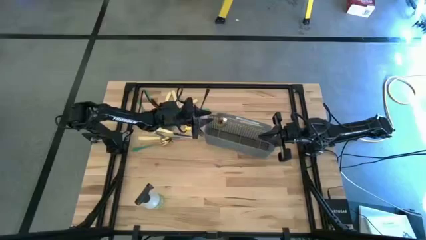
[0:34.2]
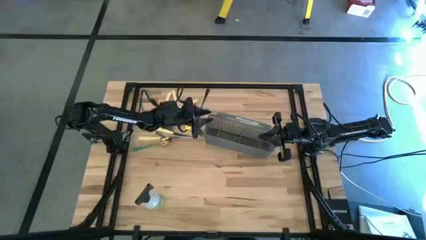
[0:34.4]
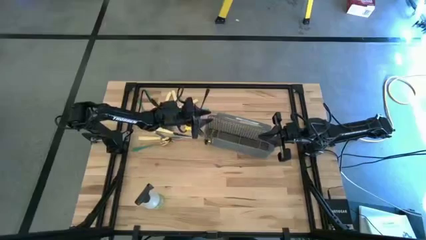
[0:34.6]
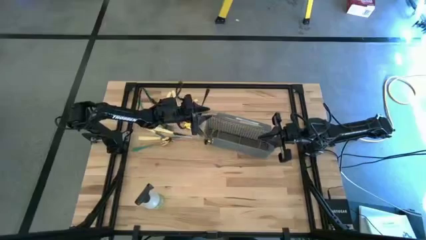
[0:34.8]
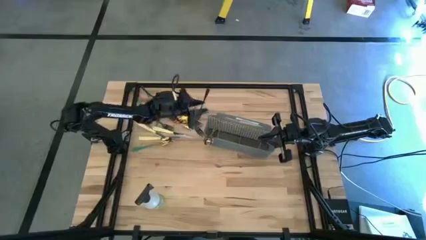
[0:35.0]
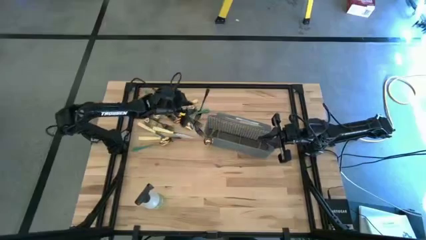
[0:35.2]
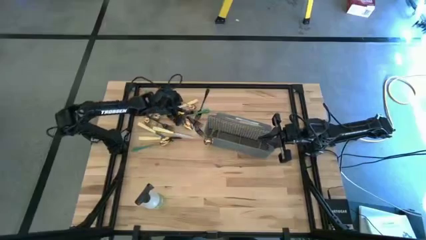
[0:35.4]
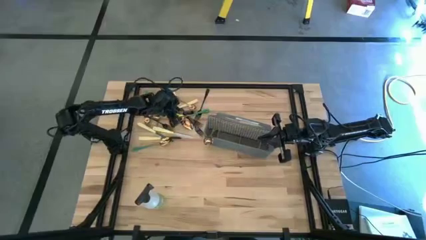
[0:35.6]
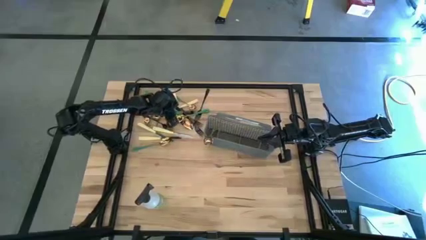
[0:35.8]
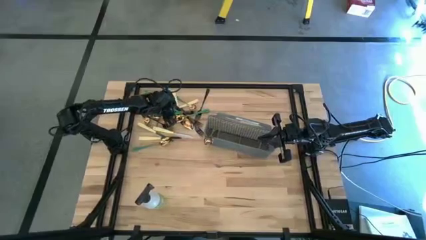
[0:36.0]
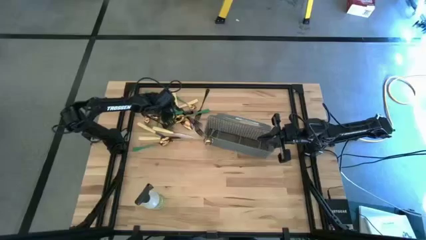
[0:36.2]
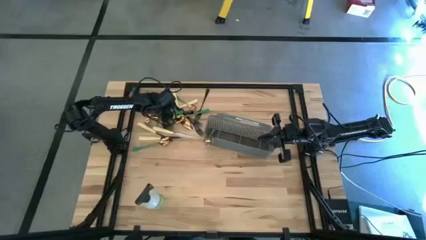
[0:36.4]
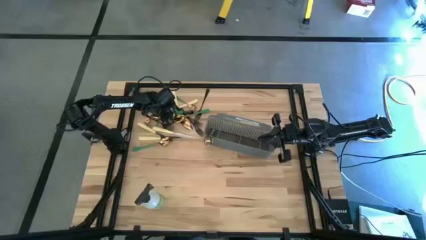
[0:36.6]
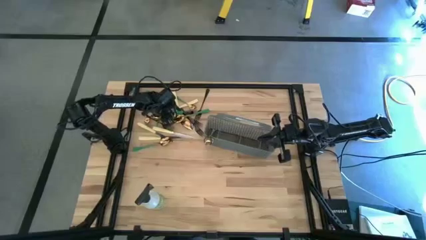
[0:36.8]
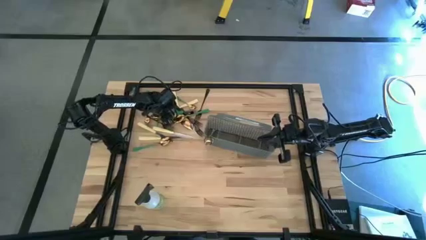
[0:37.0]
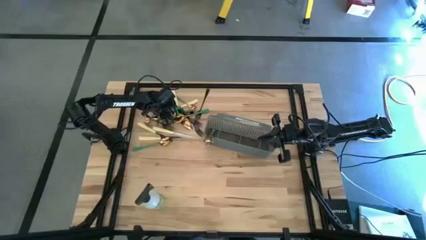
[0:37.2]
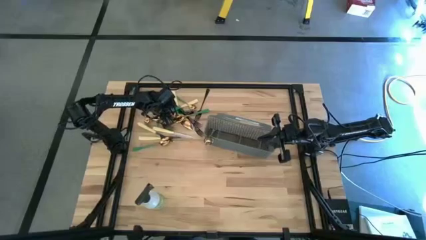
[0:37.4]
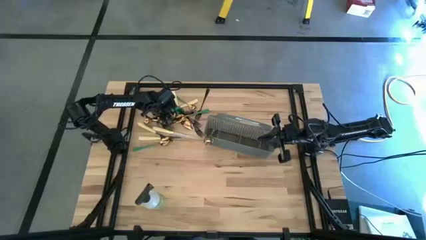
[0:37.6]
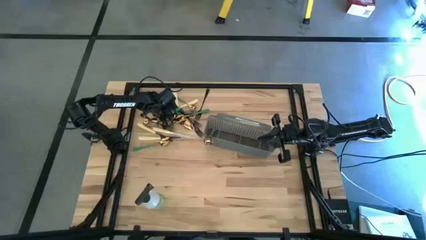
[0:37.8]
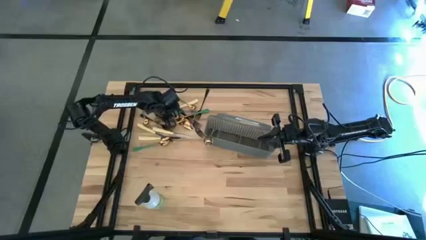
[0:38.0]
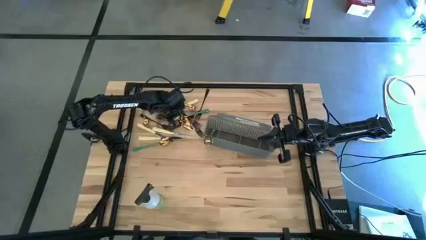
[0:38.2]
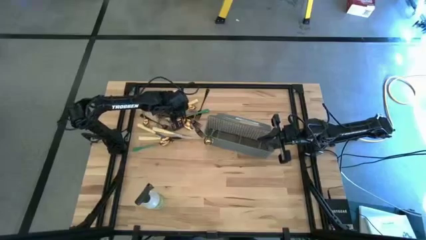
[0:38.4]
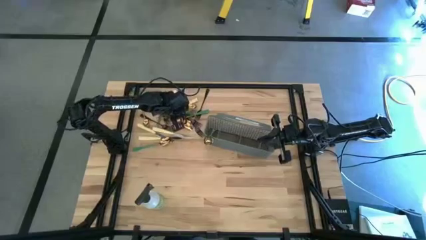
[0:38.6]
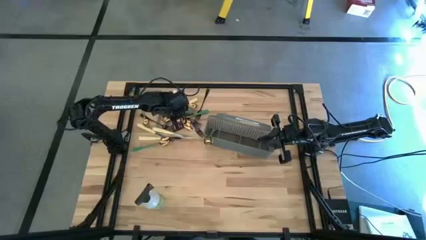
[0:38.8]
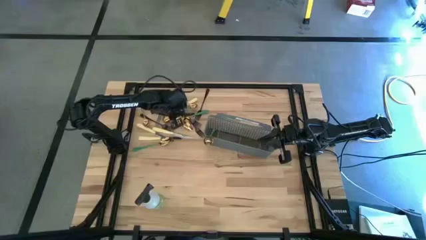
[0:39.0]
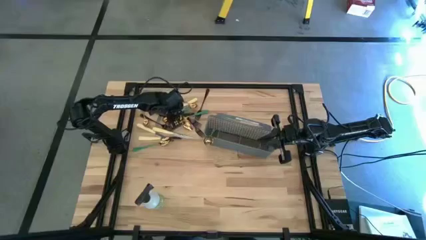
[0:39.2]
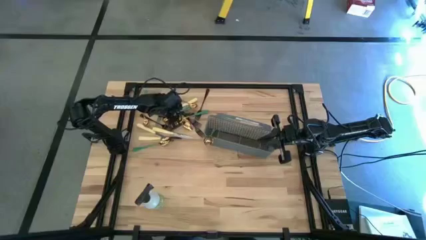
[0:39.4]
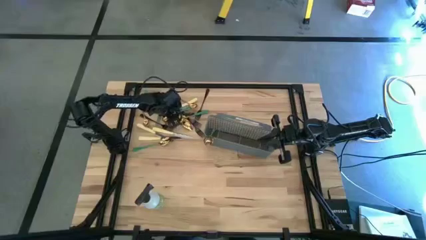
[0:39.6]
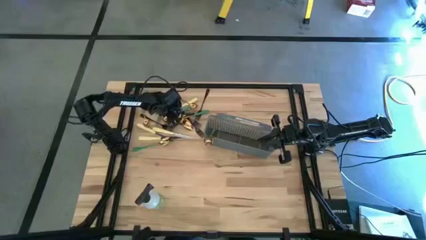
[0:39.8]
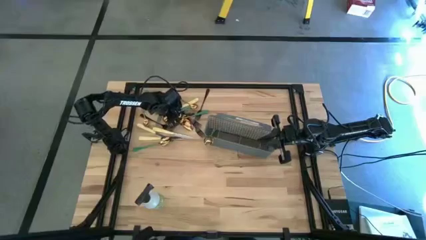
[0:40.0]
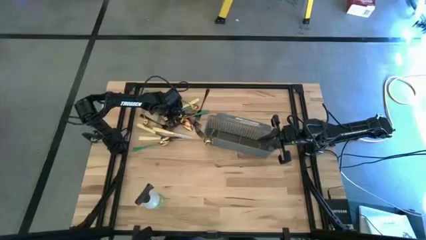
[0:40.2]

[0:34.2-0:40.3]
Task: Sort silverware
Put the gold spoon into the cutlery rack

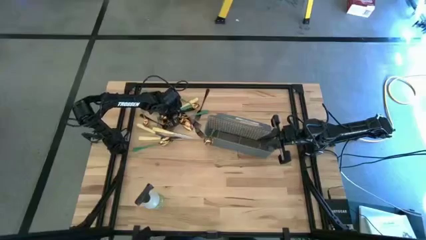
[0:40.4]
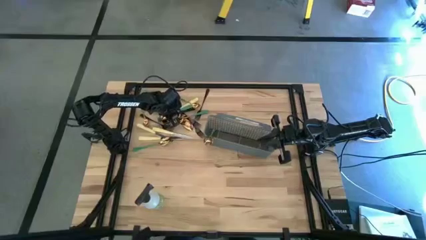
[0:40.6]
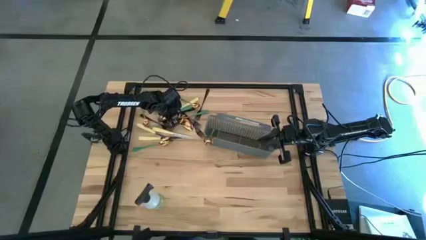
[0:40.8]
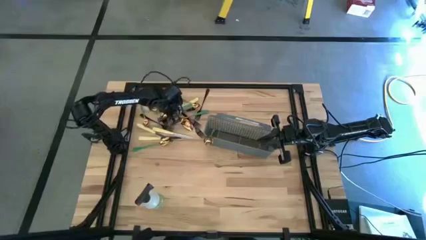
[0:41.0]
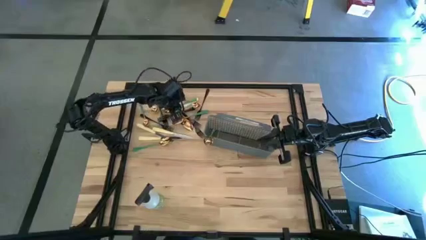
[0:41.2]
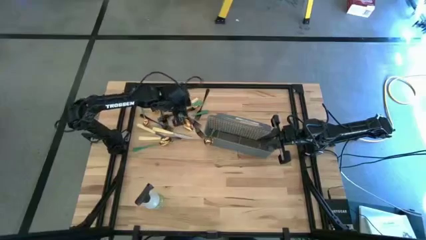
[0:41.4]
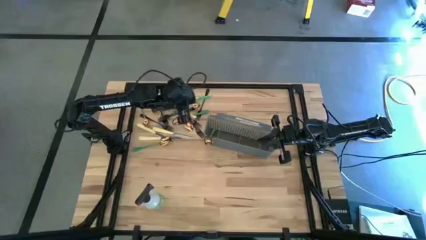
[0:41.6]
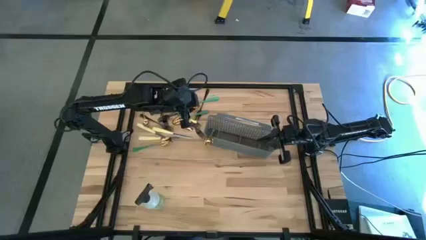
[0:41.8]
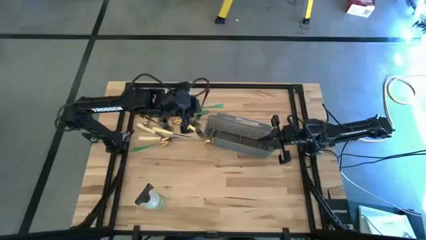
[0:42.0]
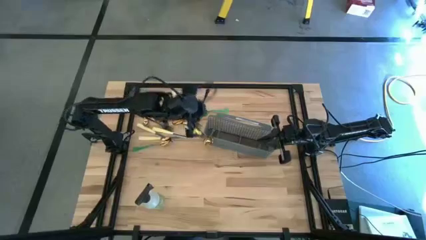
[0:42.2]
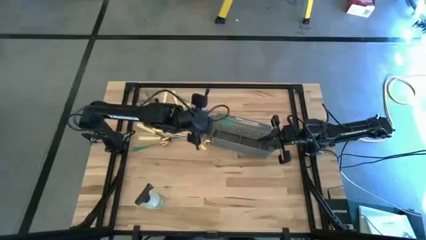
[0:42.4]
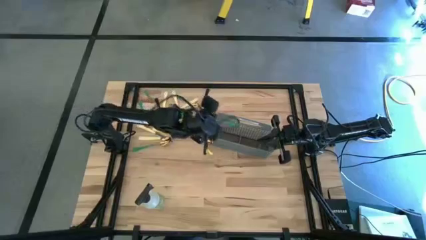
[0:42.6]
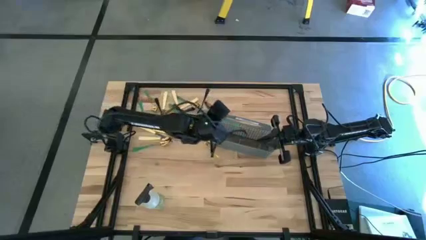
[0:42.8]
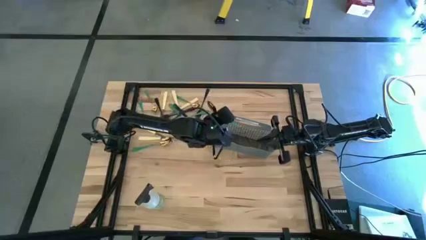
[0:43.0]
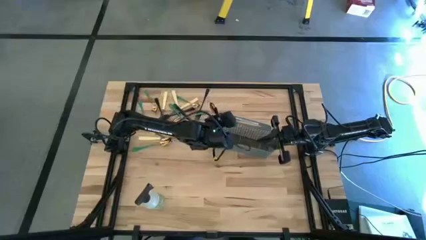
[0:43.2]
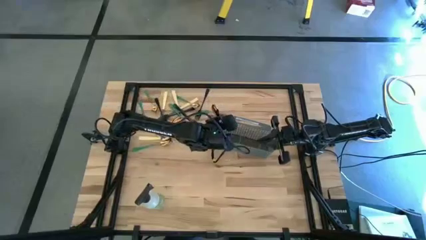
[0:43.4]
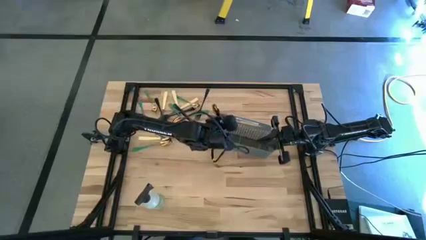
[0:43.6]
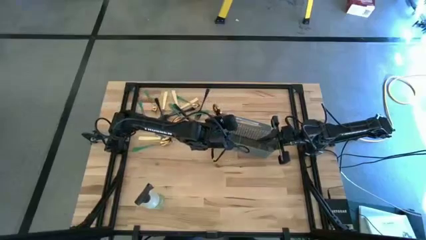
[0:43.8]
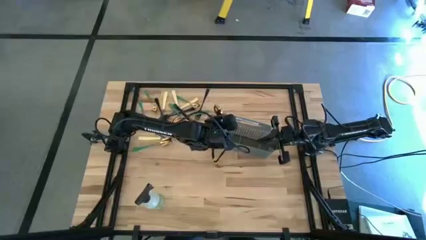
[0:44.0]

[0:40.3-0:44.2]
Put the gold spoon into the cutlery rack

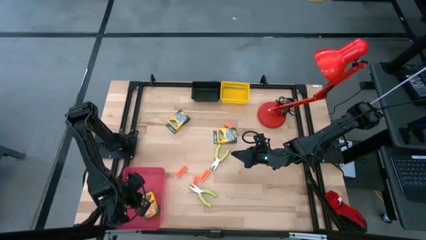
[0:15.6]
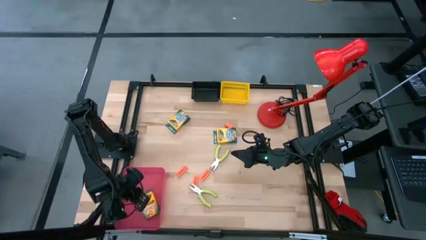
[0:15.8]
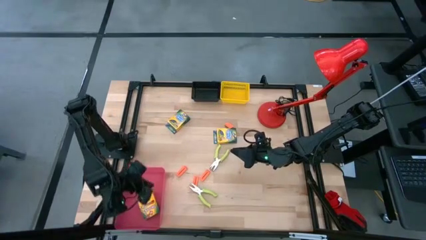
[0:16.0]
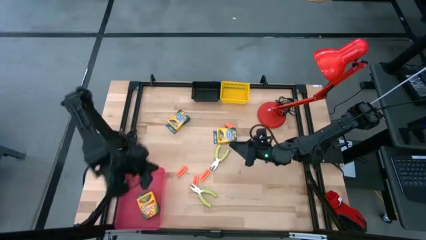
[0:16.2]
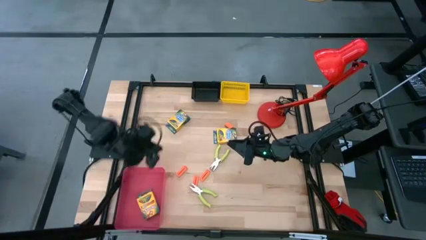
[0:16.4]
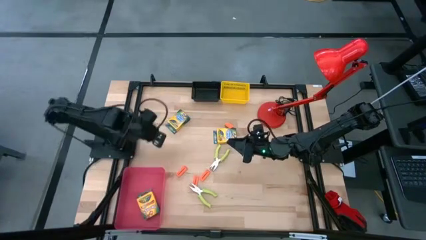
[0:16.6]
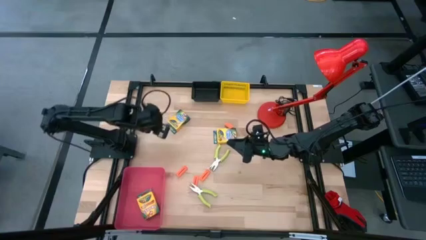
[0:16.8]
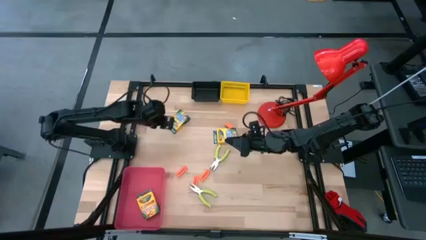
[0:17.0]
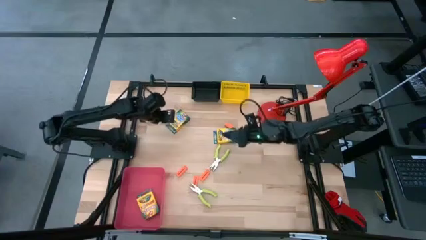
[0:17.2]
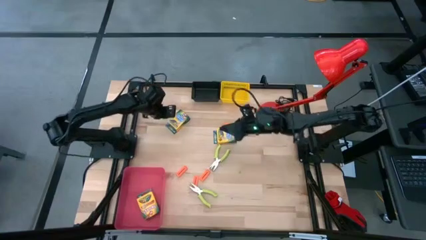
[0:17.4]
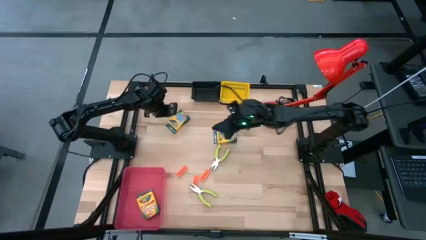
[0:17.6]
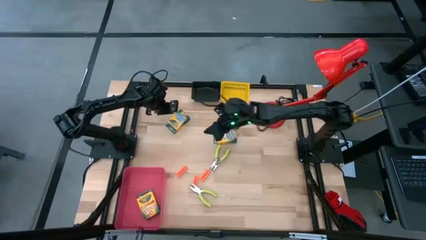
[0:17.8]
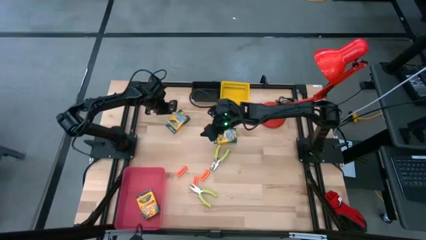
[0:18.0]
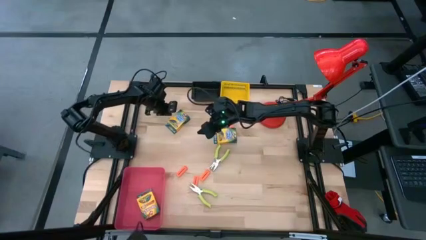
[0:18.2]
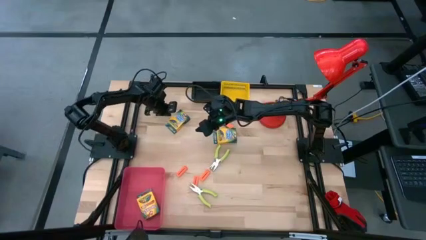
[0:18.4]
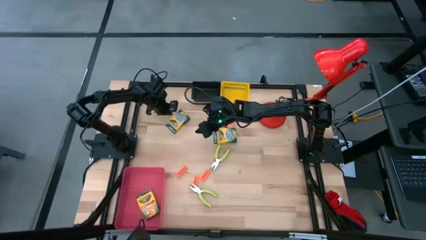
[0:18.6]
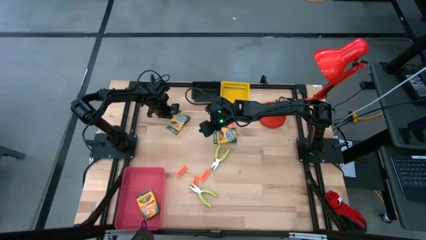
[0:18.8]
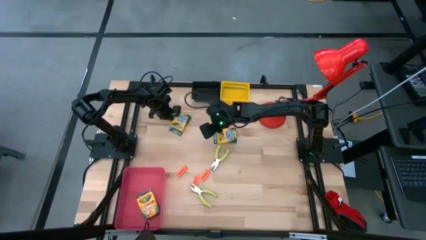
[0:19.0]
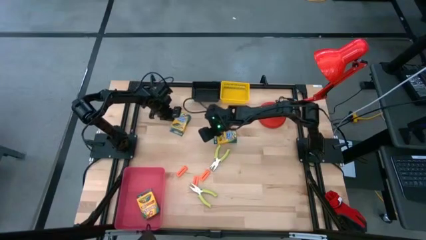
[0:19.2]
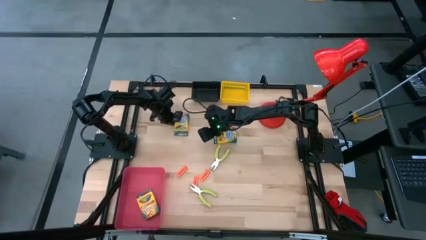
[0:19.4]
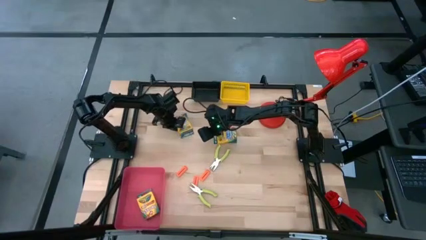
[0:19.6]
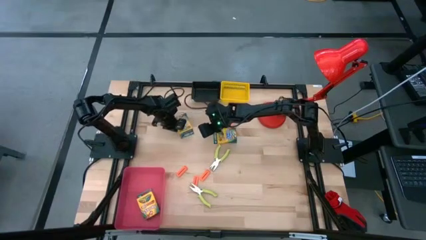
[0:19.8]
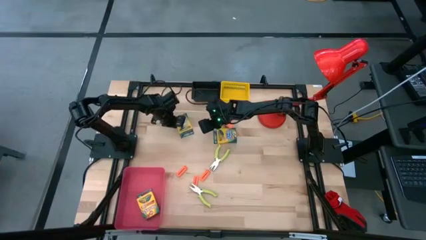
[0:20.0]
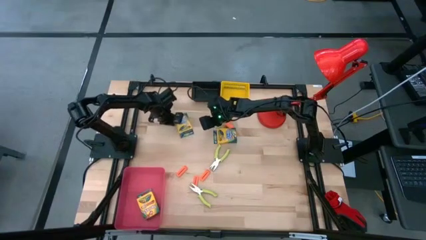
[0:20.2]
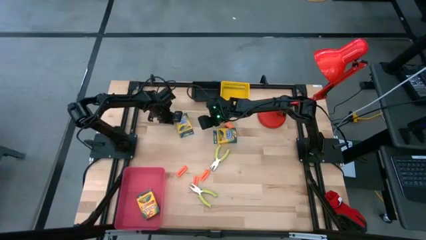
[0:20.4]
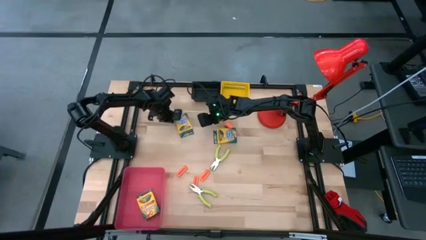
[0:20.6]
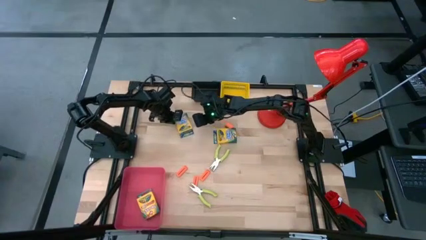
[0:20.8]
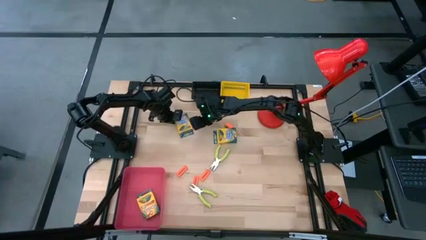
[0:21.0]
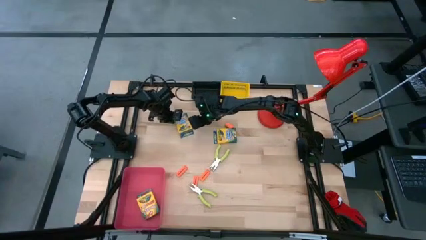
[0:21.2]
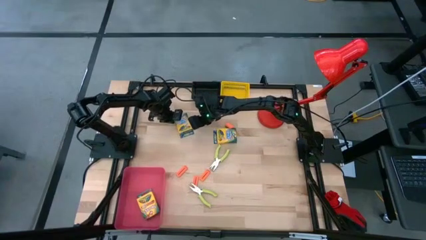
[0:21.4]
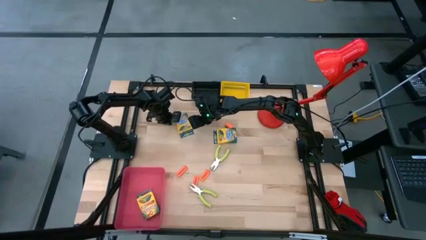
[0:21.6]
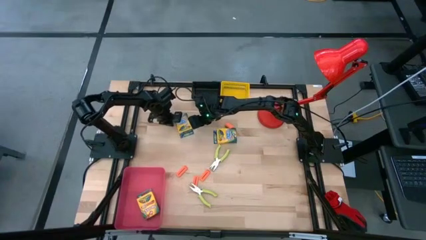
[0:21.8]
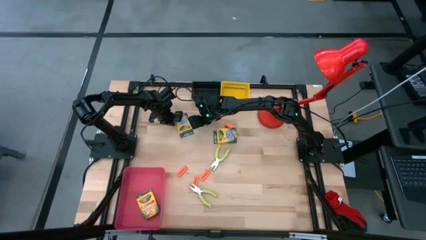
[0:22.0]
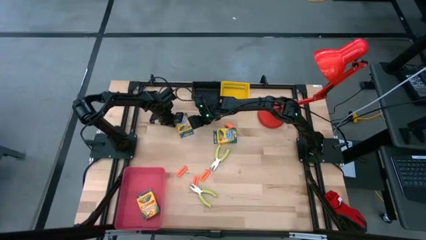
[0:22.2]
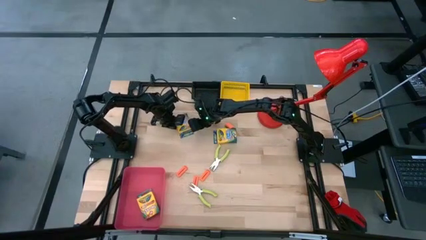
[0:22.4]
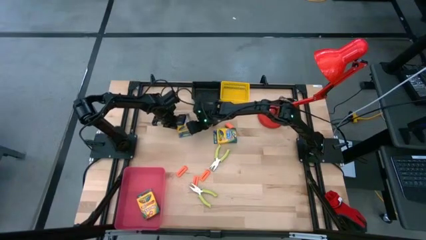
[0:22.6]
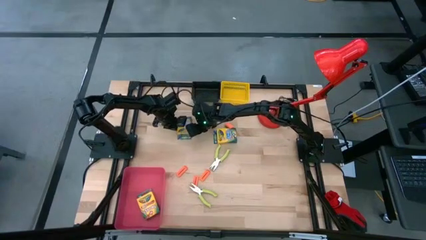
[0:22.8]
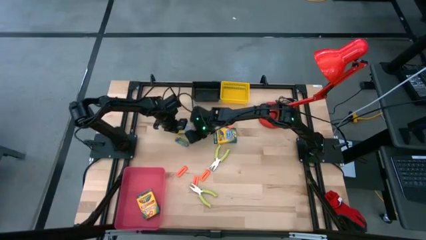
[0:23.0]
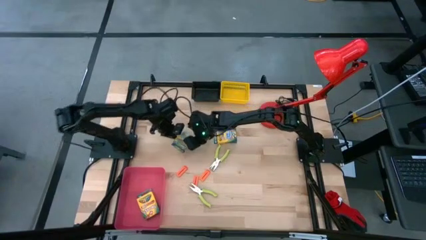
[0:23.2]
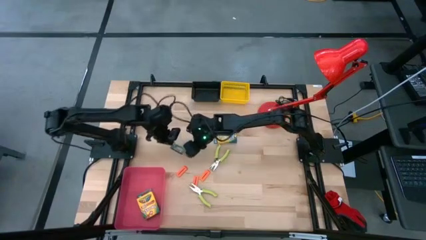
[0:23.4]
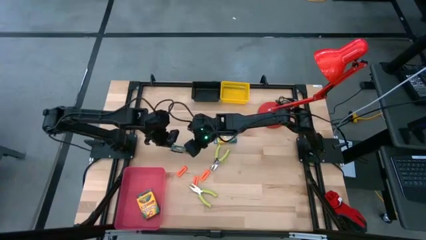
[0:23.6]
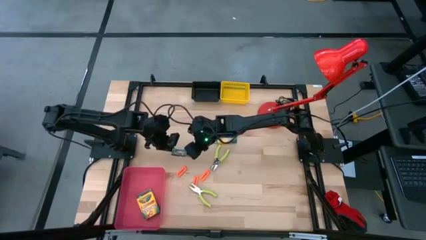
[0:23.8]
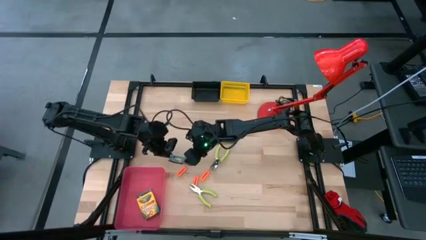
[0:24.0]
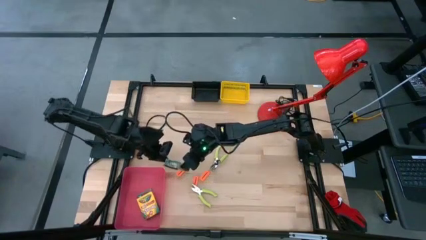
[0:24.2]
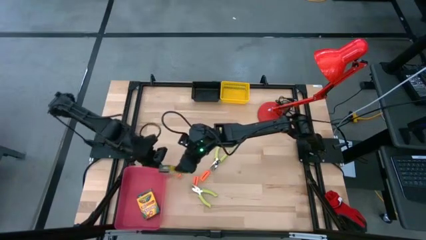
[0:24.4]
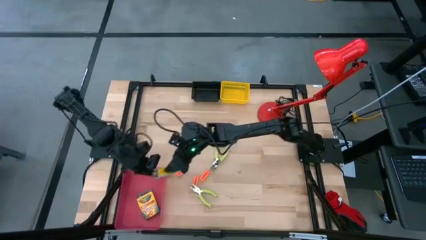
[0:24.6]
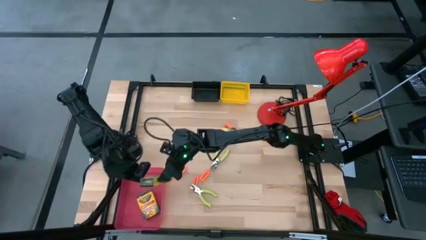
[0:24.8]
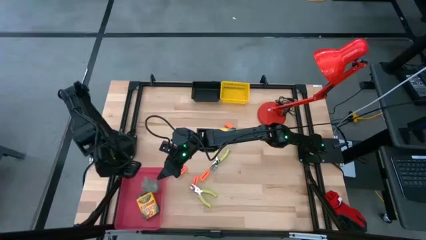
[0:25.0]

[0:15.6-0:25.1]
Task: Pick & Place School Supplies
Put the crayon box into the red bin
